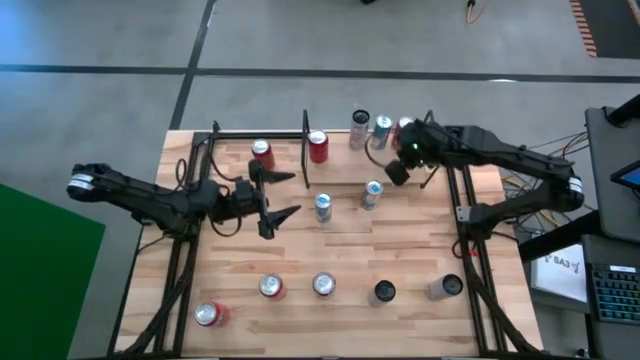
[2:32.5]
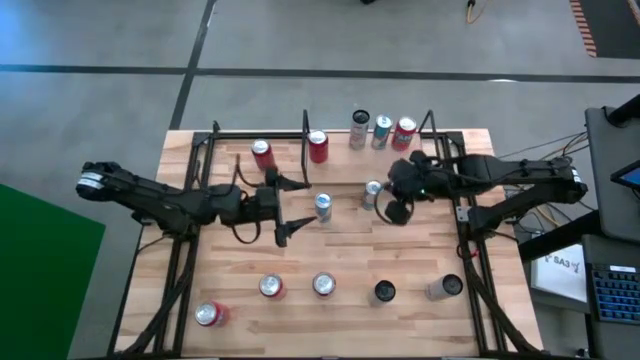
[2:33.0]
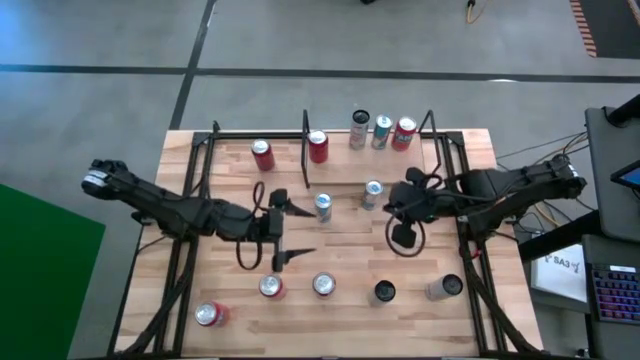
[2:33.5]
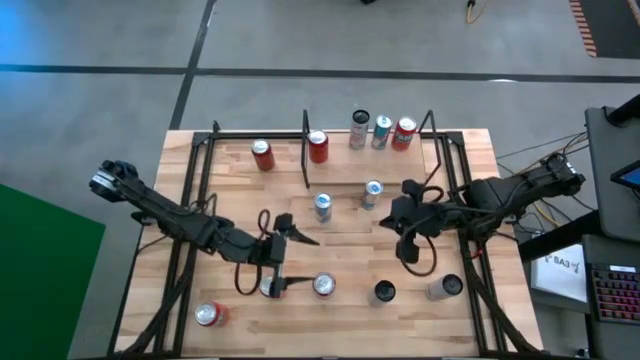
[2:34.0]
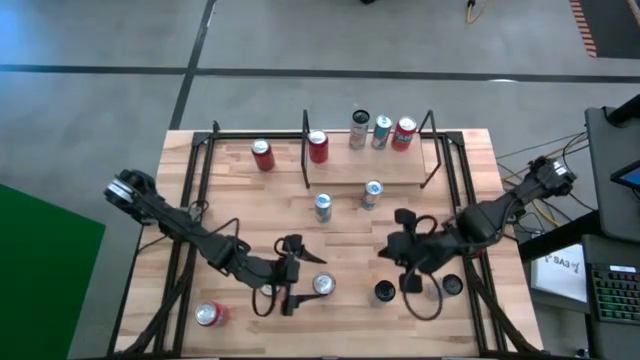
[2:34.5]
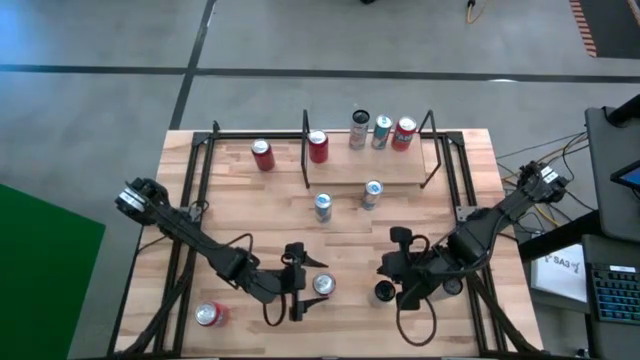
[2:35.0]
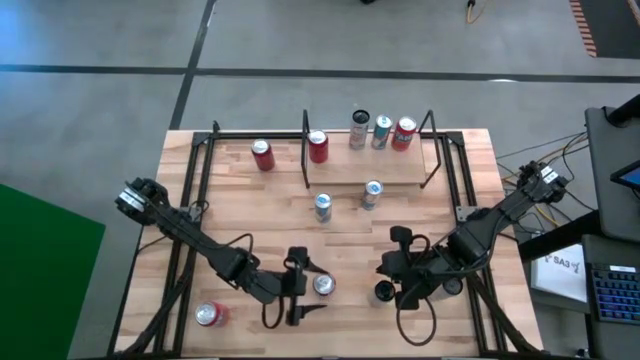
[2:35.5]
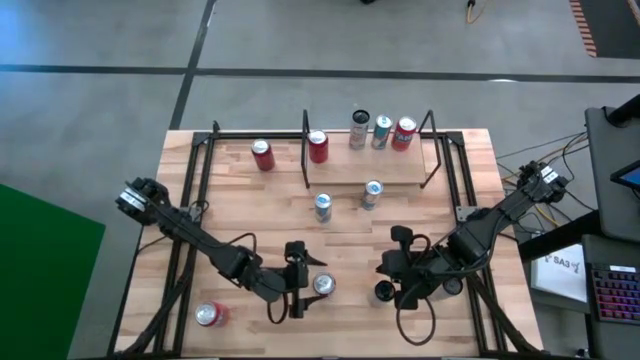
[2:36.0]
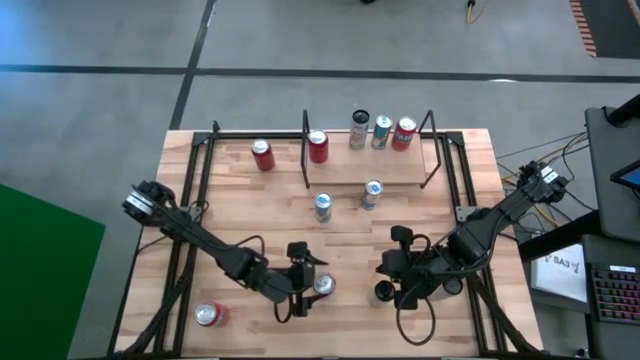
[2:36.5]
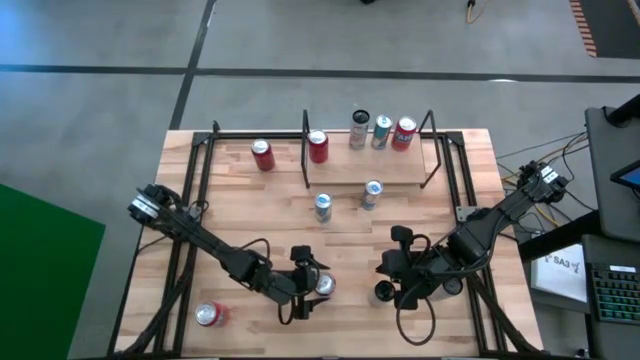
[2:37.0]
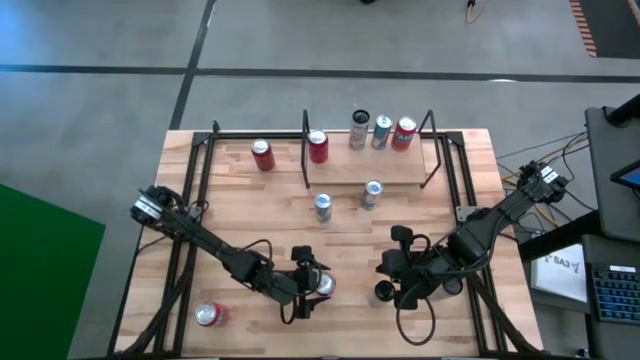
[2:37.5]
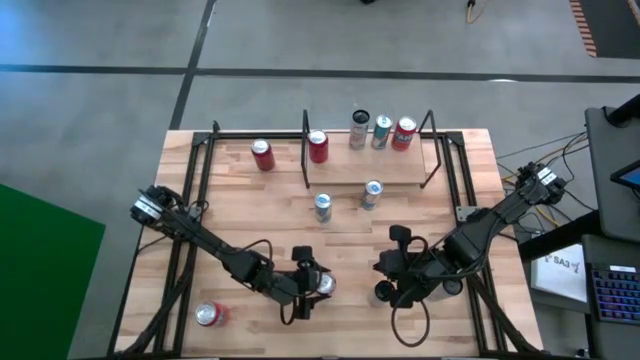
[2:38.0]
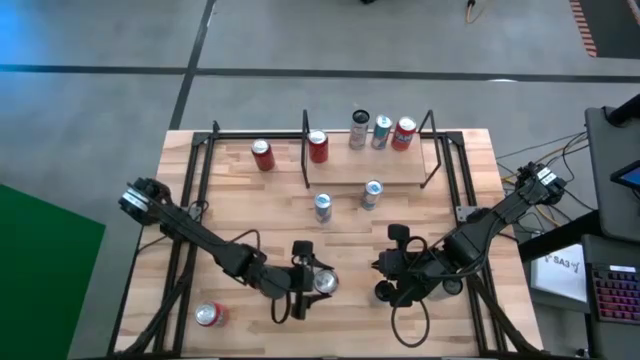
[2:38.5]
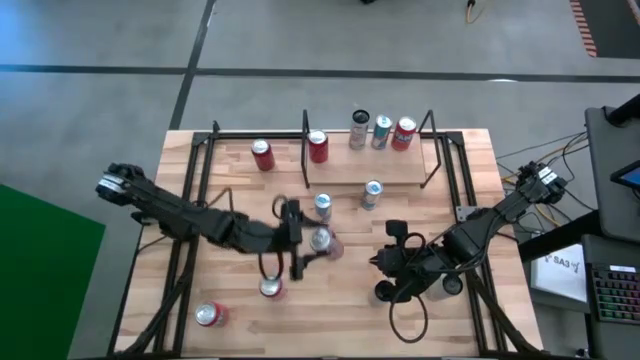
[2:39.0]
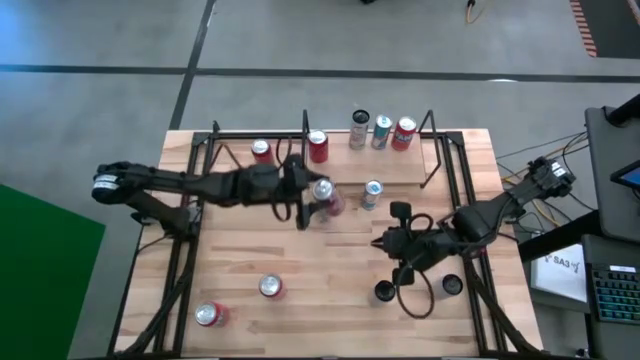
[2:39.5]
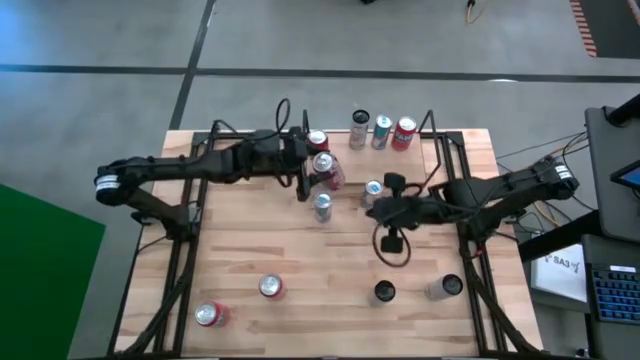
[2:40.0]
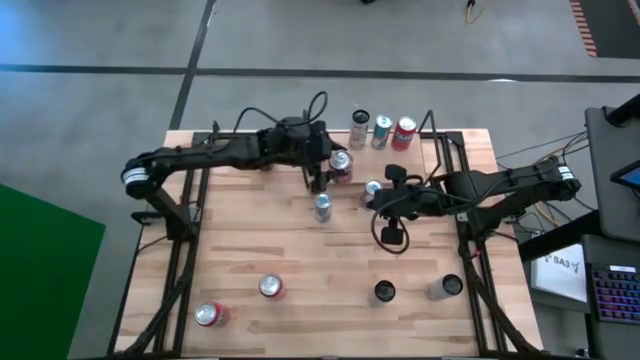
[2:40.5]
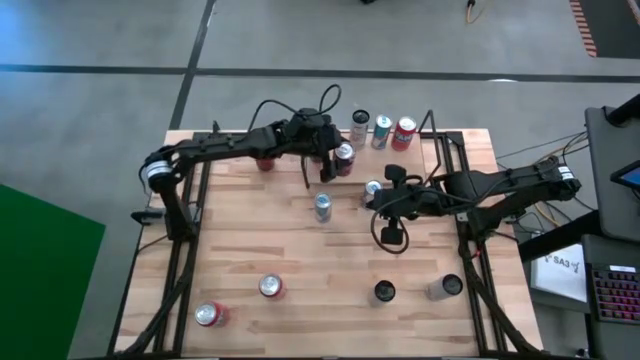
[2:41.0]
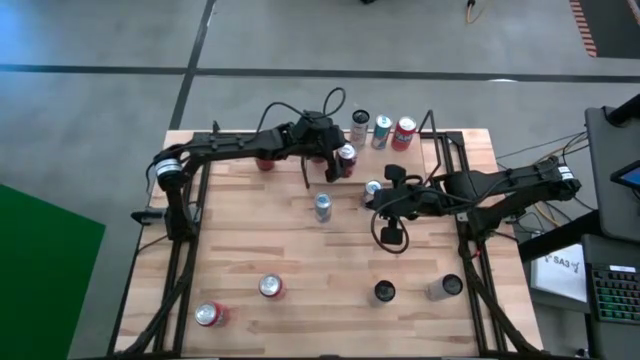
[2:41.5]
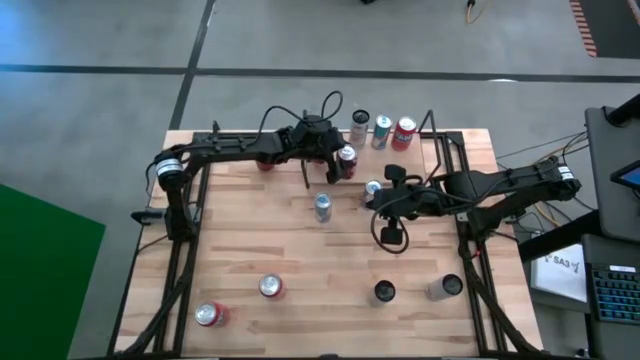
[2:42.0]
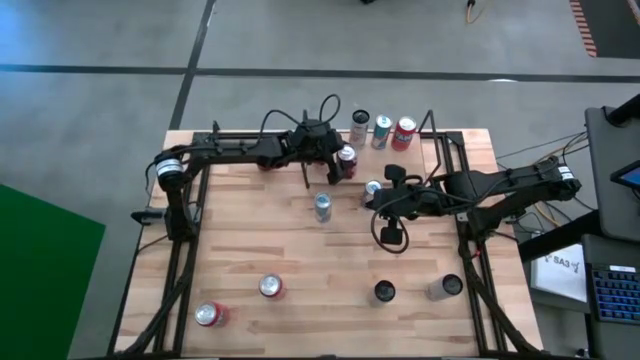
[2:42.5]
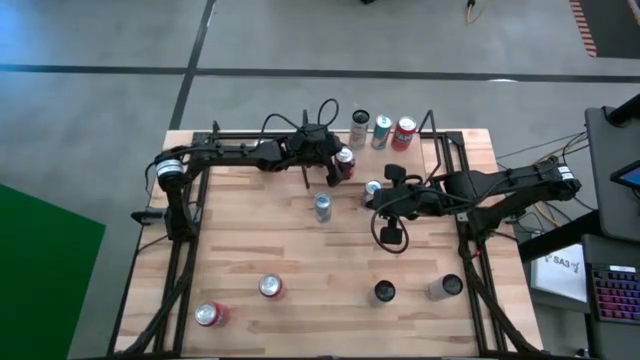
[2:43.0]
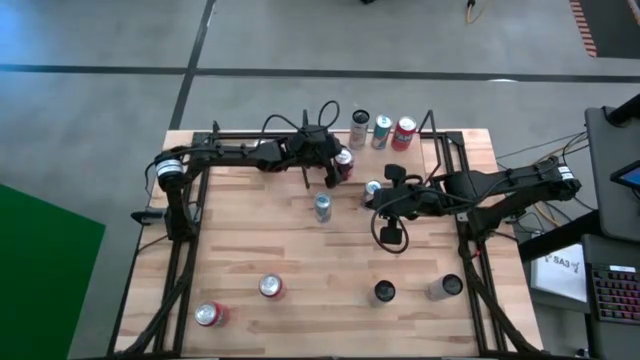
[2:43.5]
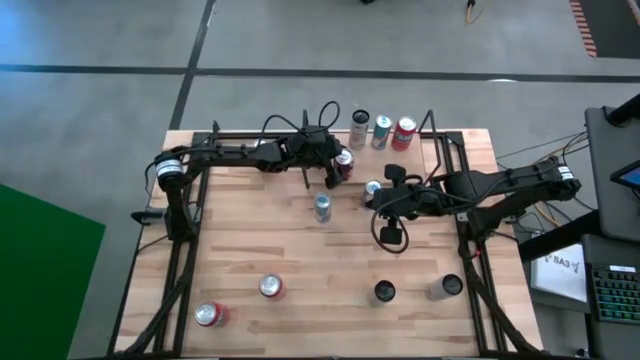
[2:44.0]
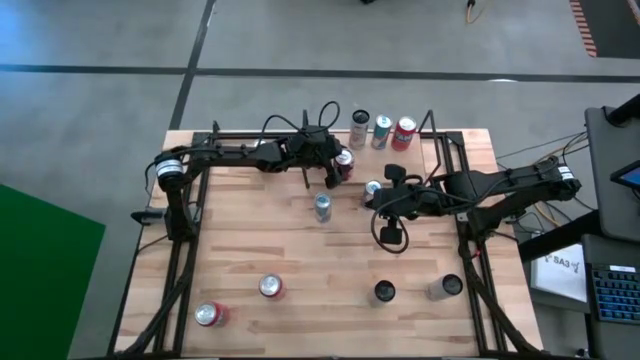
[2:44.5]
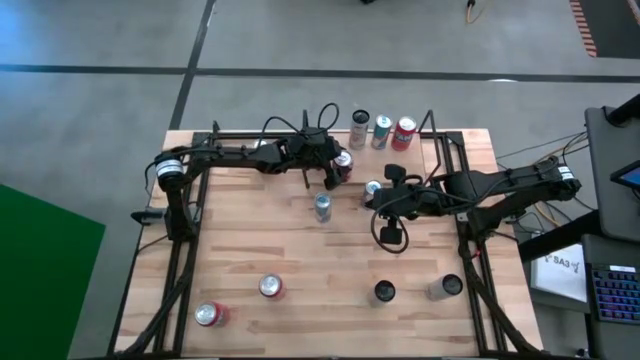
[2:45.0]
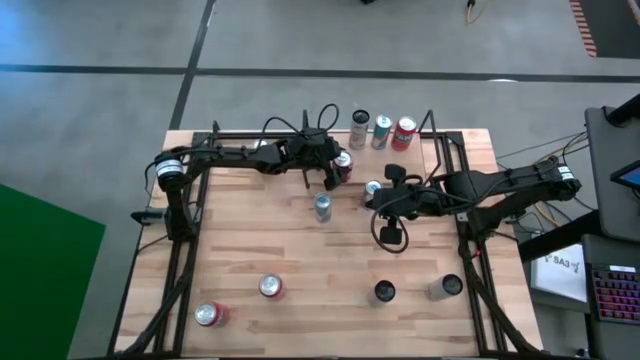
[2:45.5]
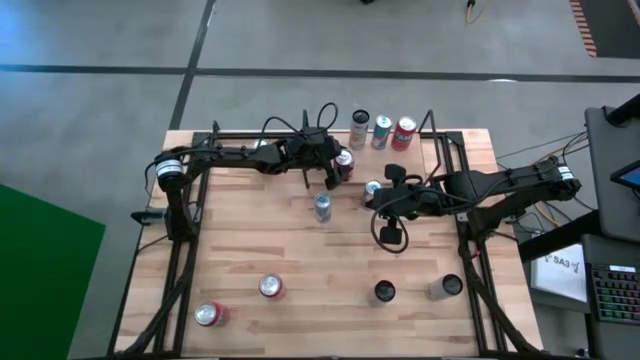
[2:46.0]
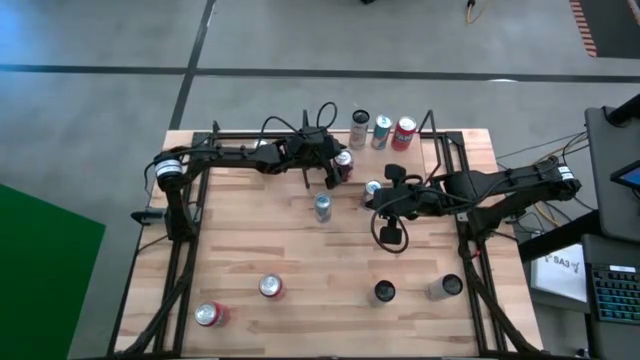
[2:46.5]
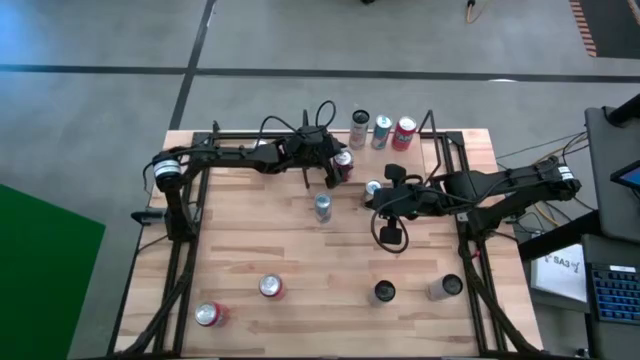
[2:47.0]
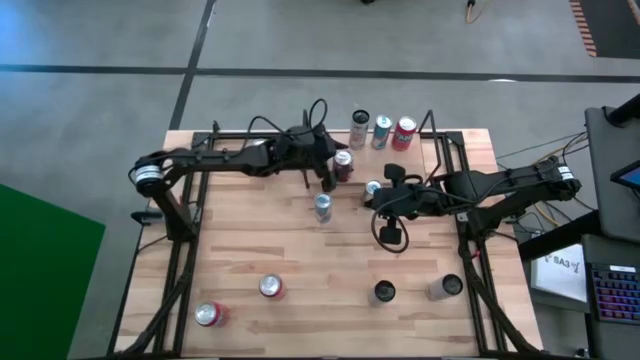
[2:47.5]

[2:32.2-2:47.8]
Task: Place canned beverage on shelf
Put the red and white soda can on the shelf

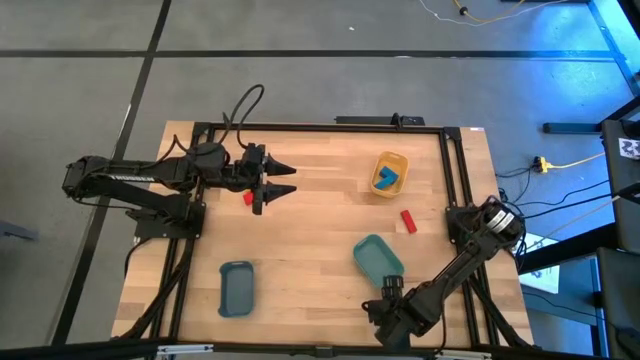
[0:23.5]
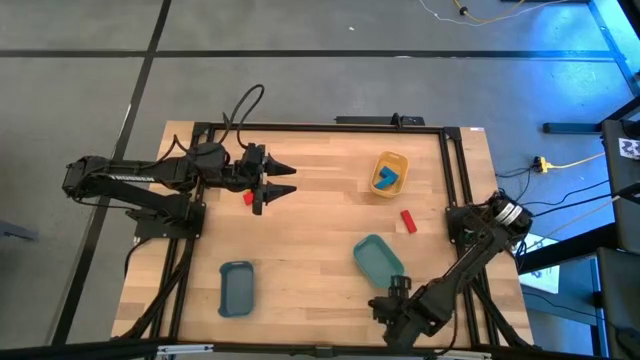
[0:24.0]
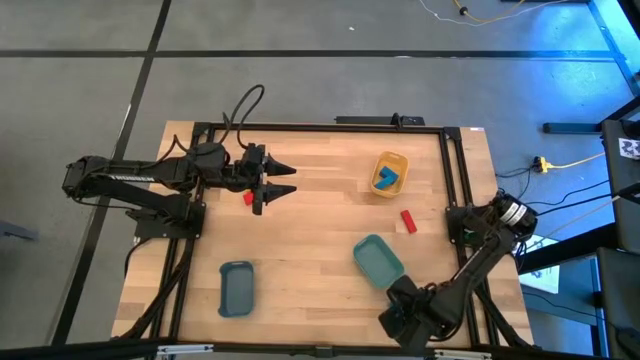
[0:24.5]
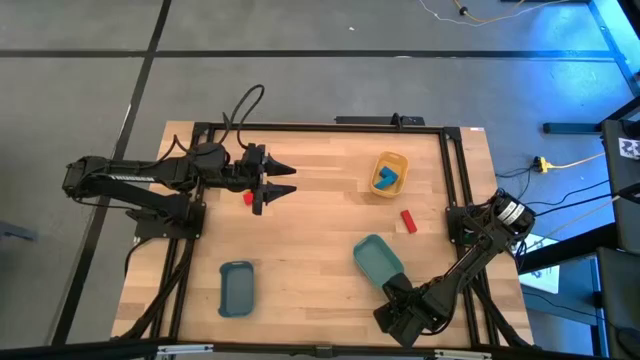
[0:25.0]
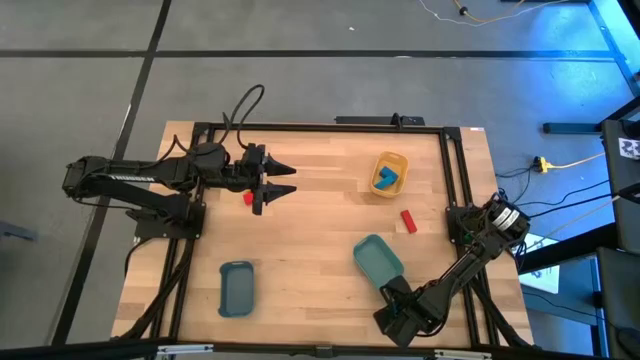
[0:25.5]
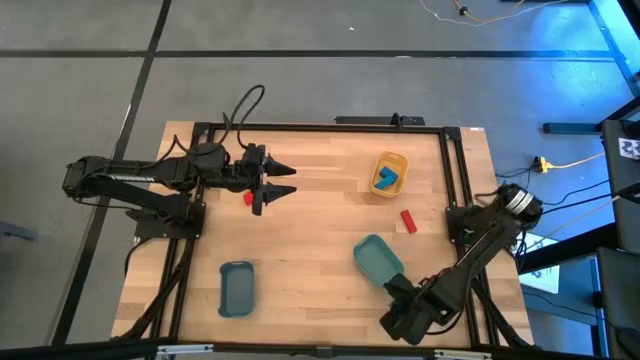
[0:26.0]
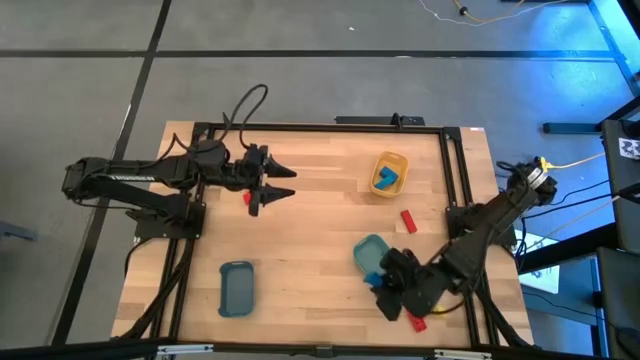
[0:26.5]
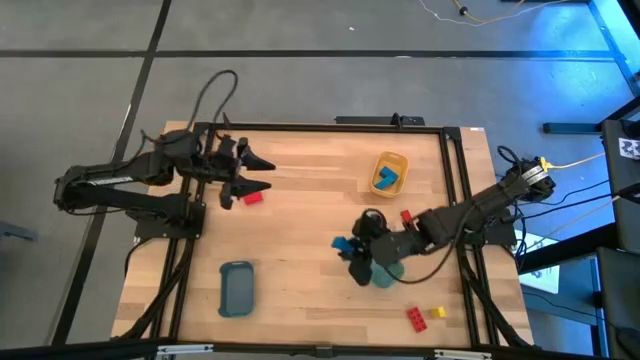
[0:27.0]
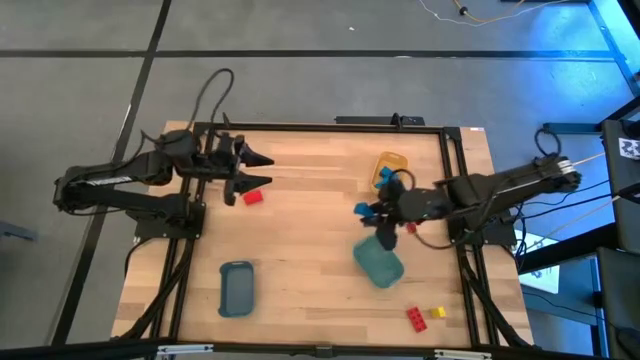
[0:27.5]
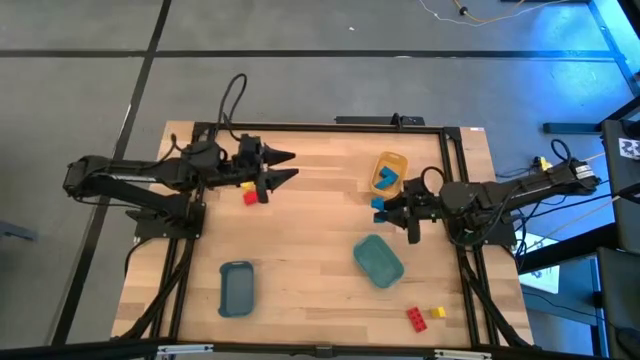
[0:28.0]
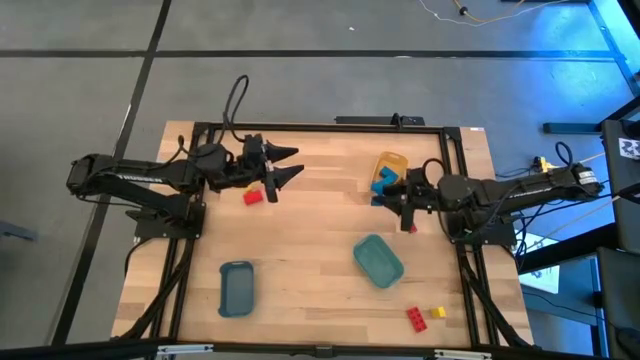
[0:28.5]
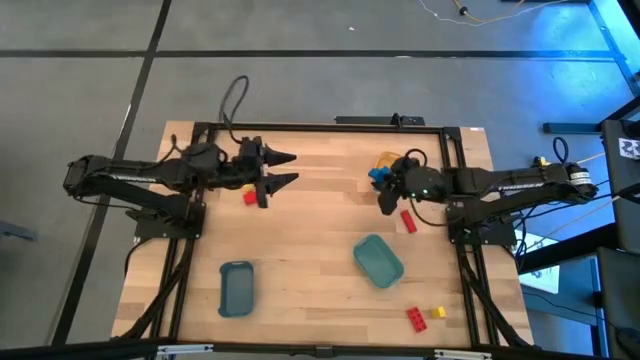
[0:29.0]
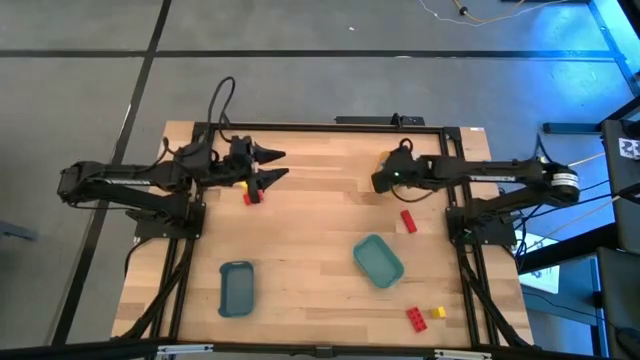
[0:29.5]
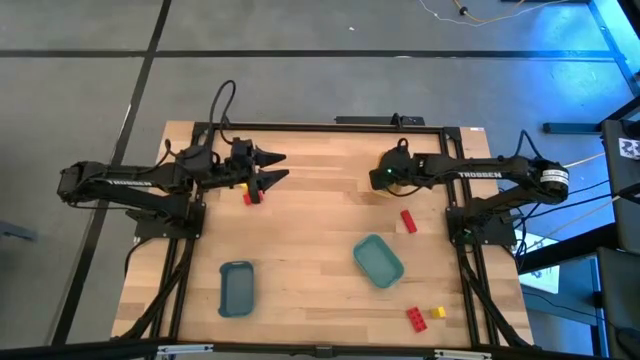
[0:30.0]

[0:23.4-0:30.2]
Task: Sort & place blocks by color
Put the blue block into the yellow bin
